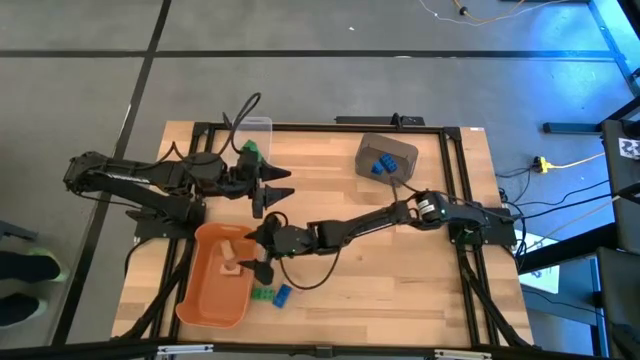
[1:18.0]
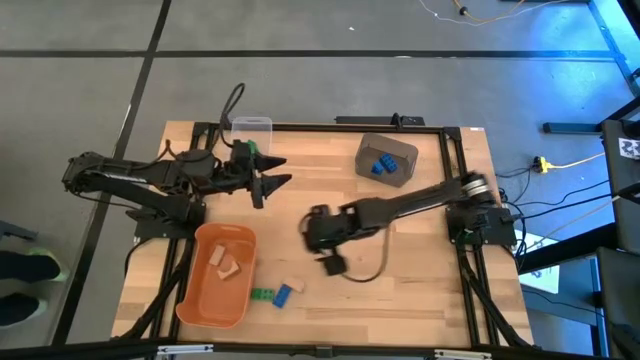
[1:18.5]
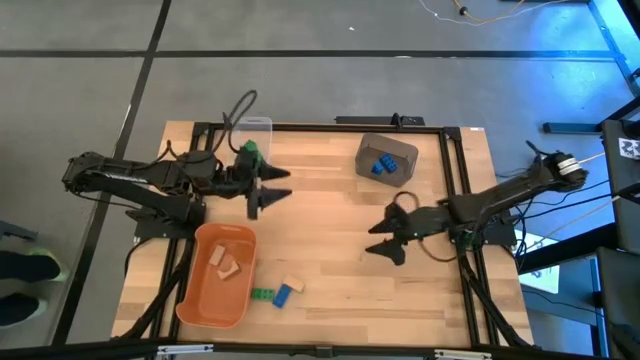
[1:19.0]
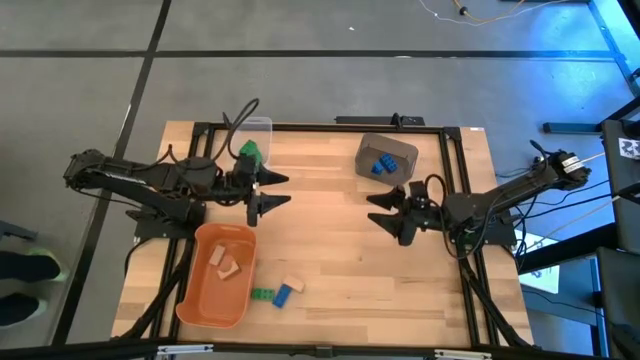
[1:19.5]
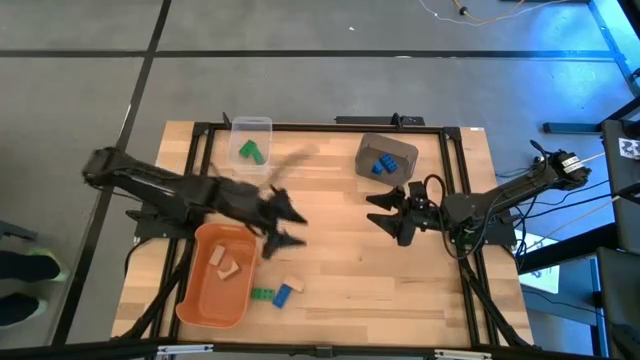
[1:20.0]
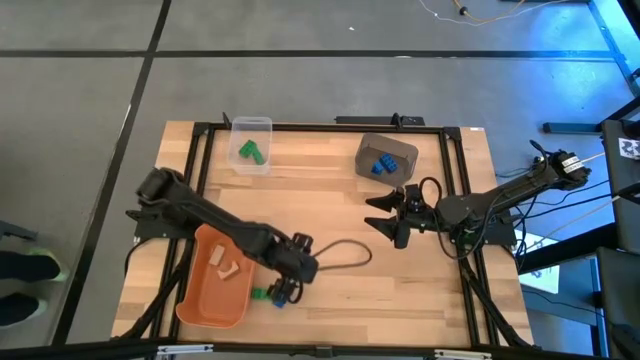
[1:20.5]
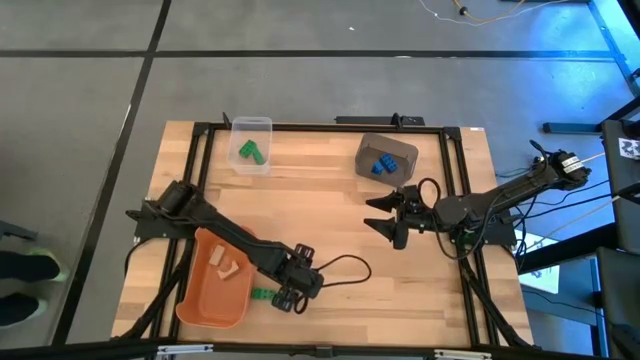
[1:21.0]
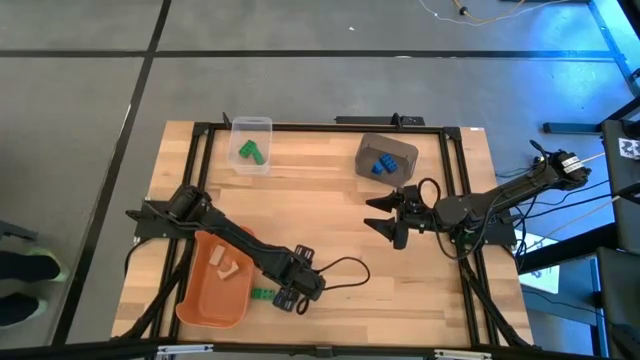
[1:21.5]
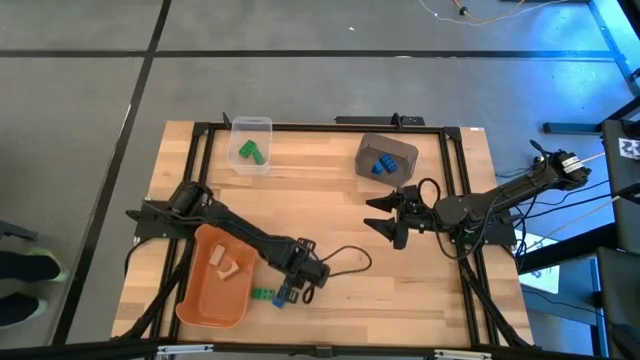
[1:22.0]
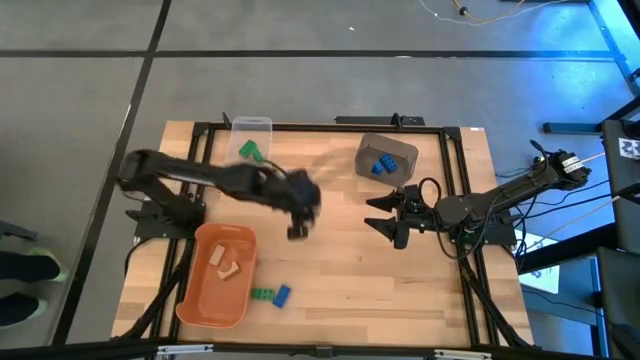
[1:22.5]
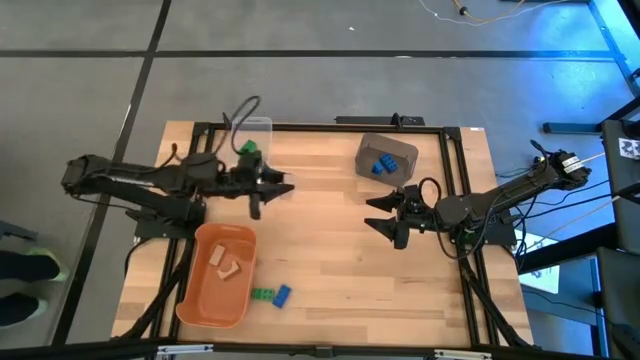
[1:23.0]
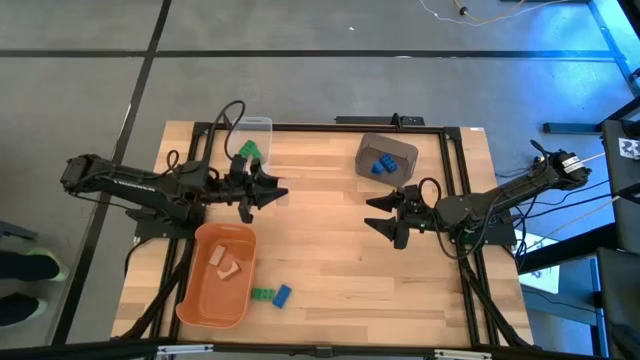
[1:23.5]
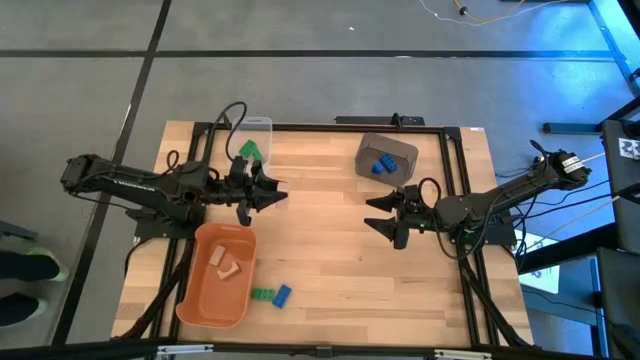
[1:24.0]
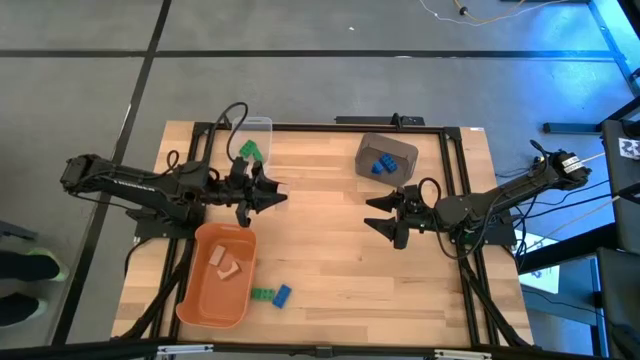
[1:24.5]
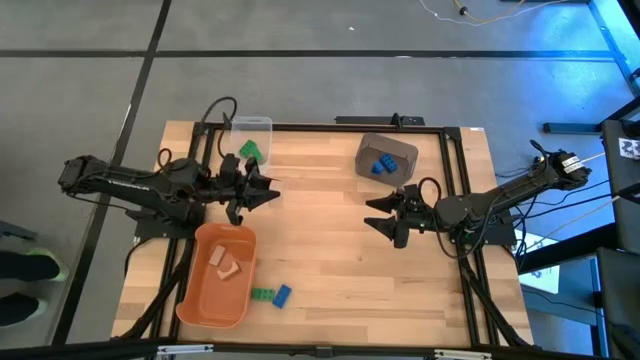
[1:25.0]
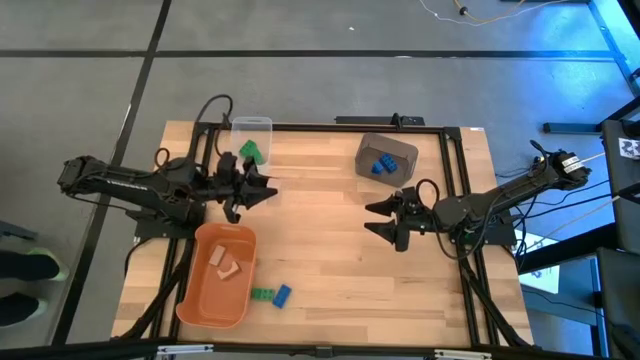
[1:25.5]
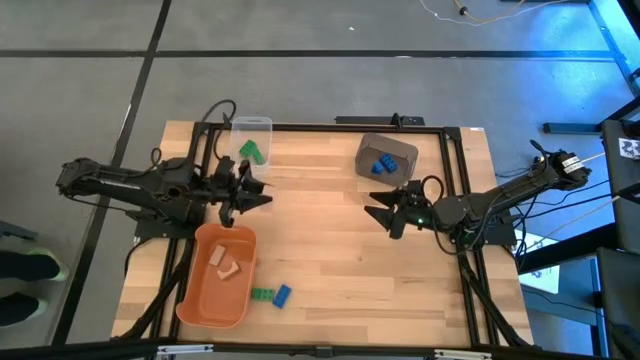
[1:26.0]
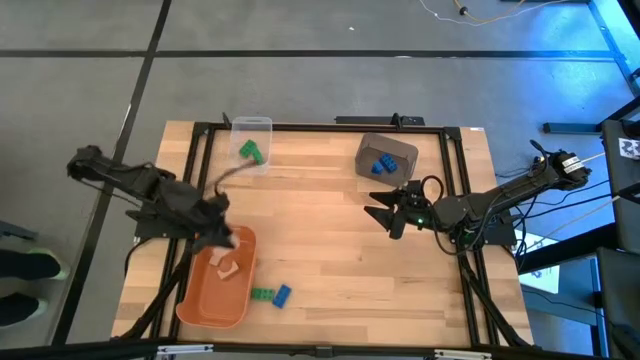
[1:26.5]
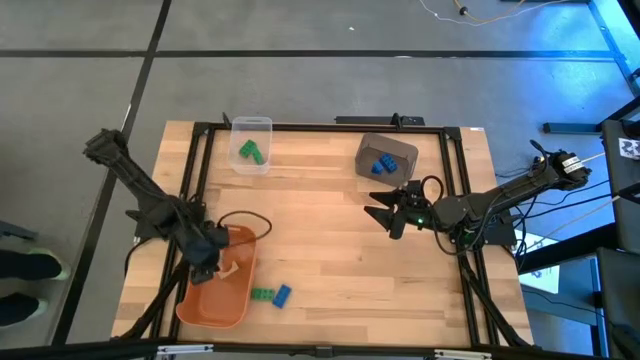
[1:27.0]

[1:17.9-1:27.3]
Task: Sort & place blocks by color
Put the brown block into the orange bin

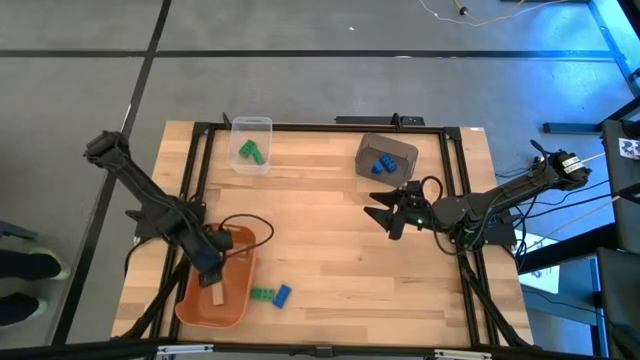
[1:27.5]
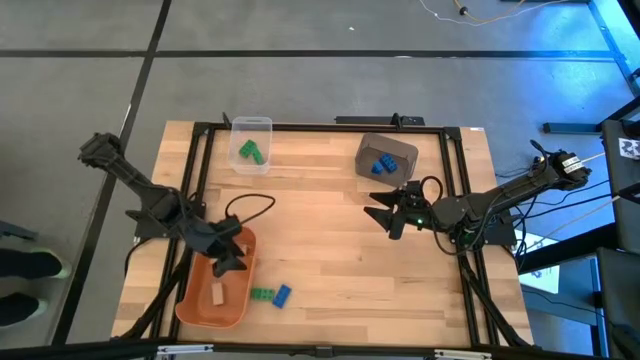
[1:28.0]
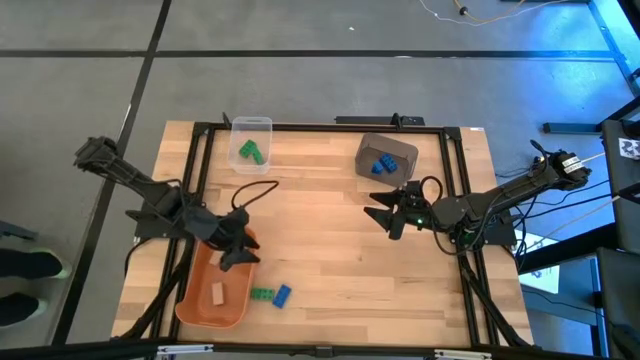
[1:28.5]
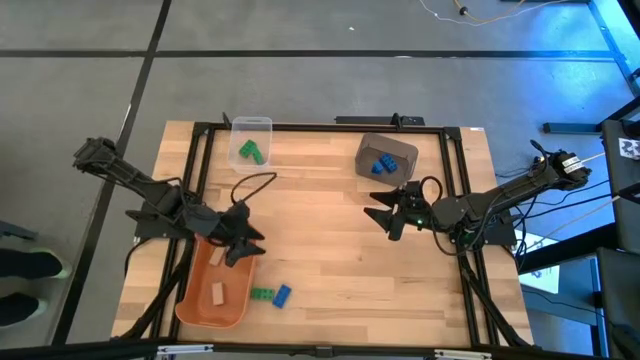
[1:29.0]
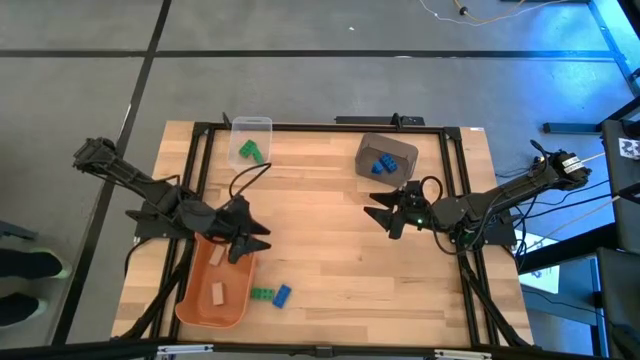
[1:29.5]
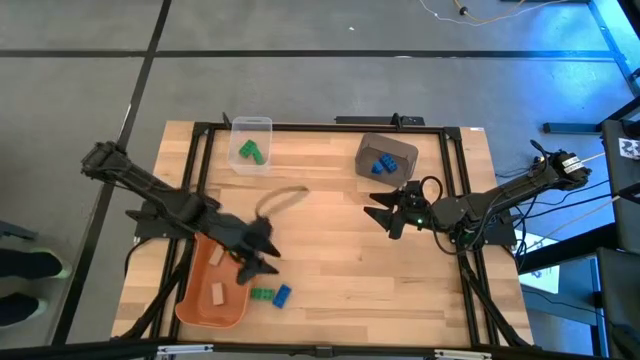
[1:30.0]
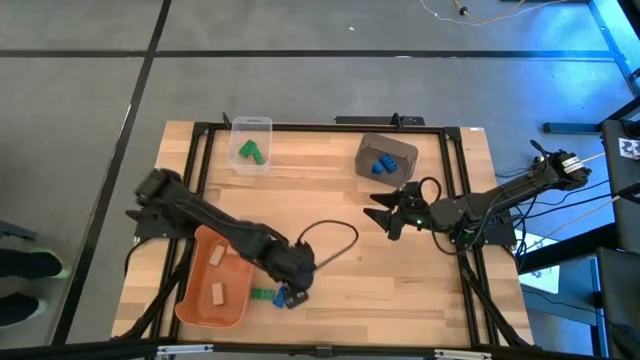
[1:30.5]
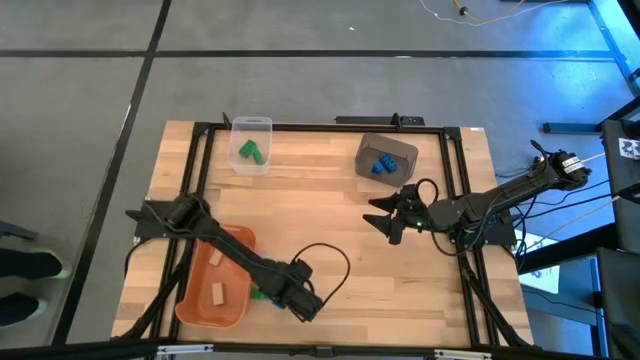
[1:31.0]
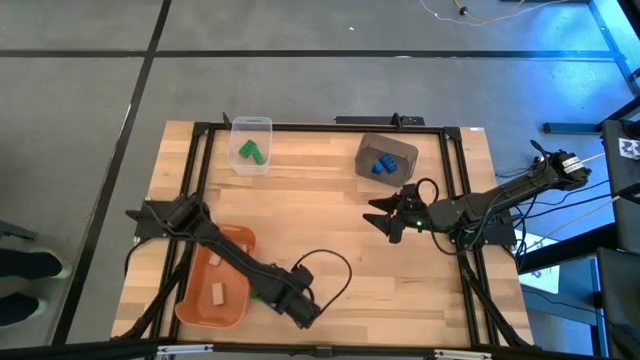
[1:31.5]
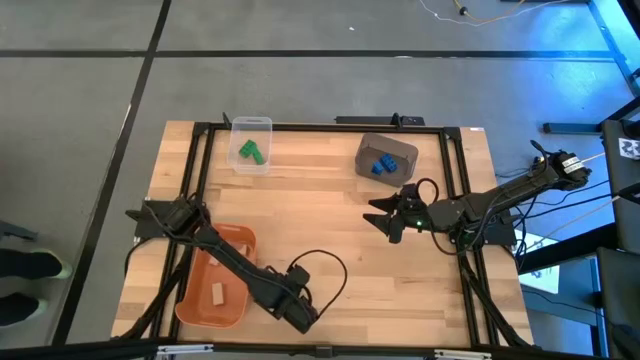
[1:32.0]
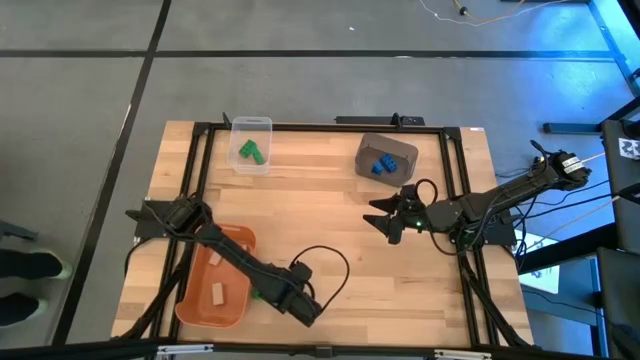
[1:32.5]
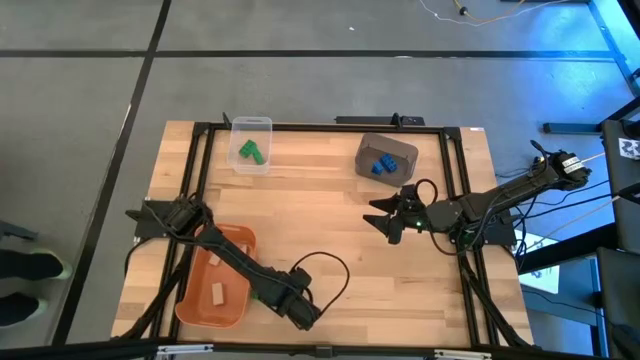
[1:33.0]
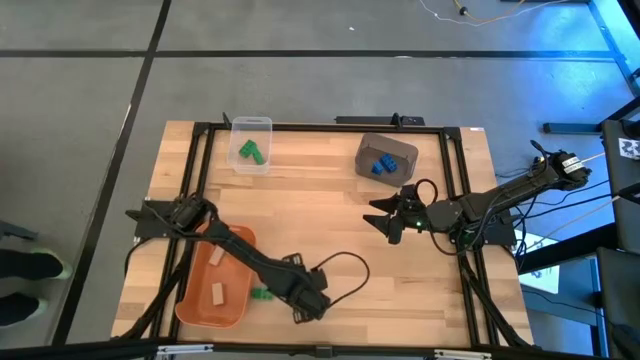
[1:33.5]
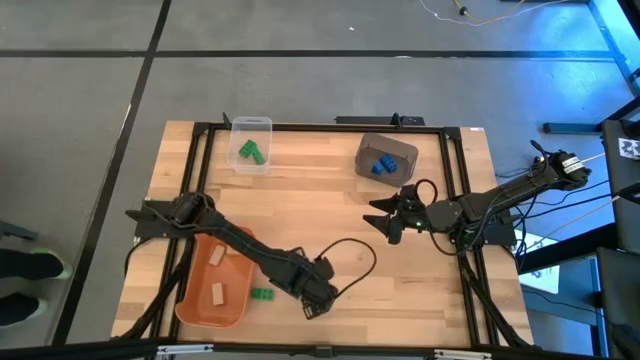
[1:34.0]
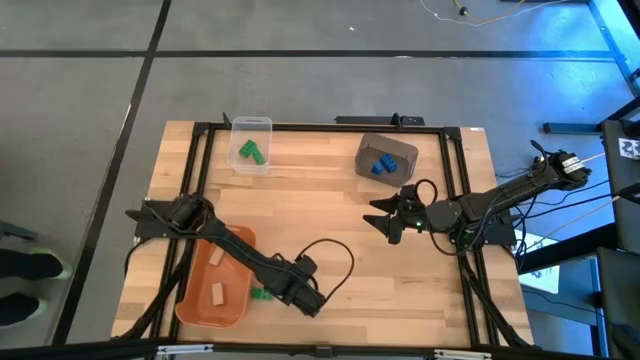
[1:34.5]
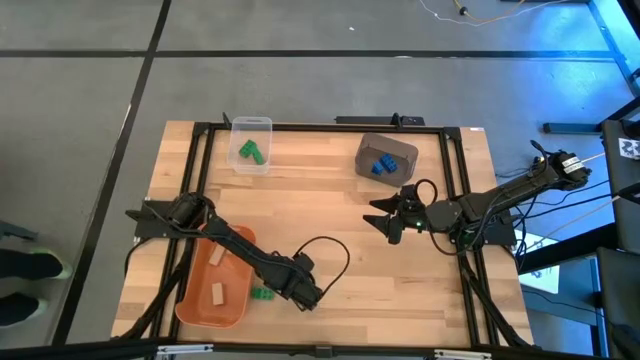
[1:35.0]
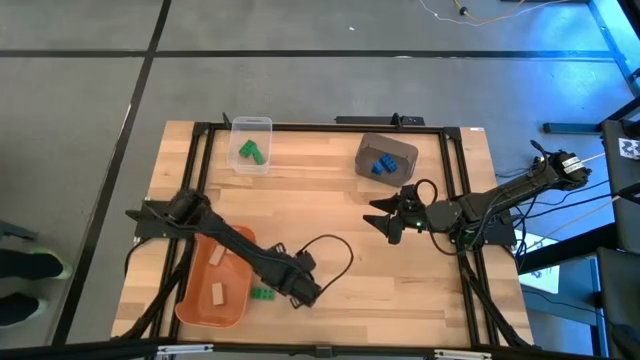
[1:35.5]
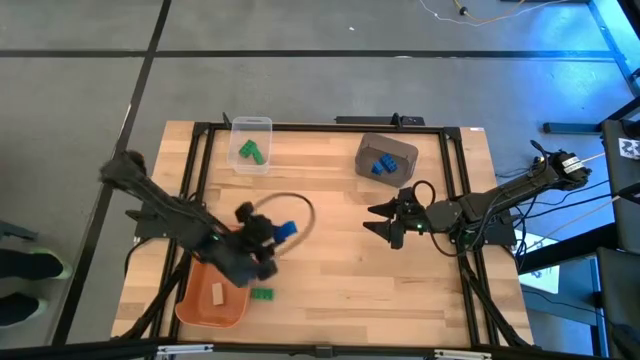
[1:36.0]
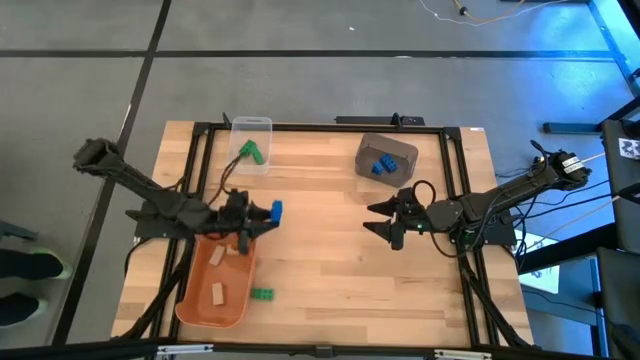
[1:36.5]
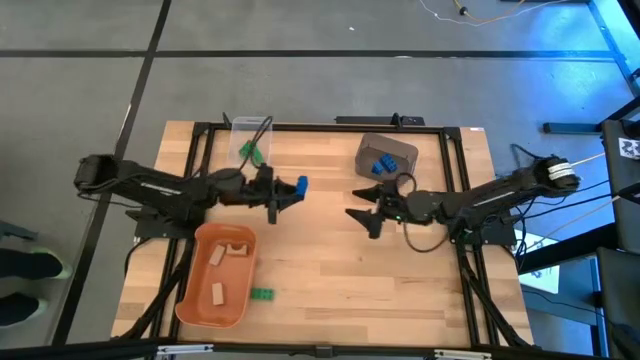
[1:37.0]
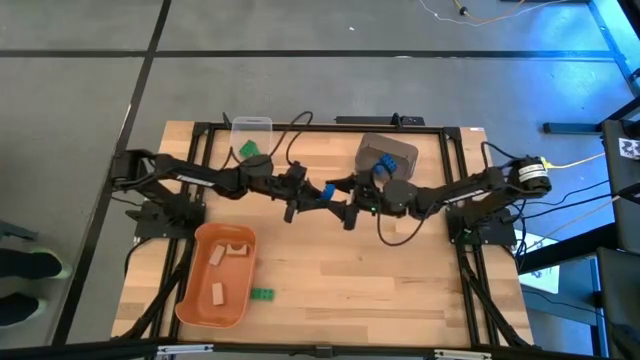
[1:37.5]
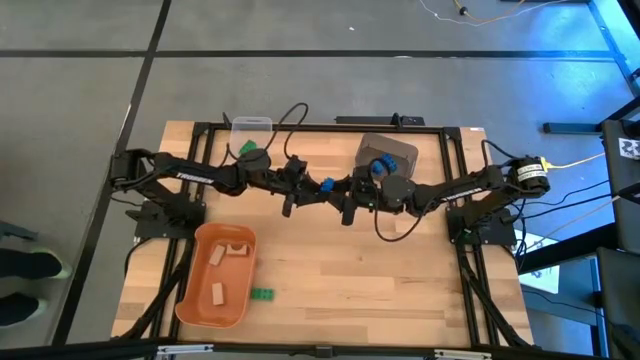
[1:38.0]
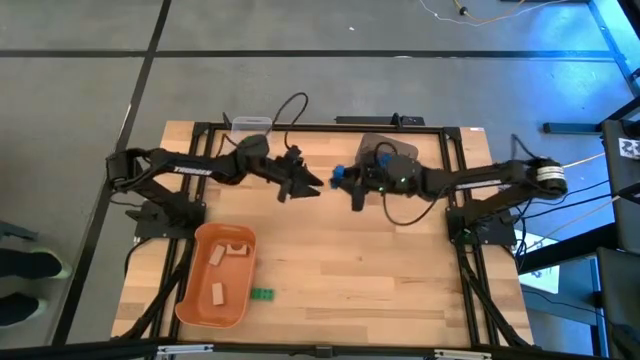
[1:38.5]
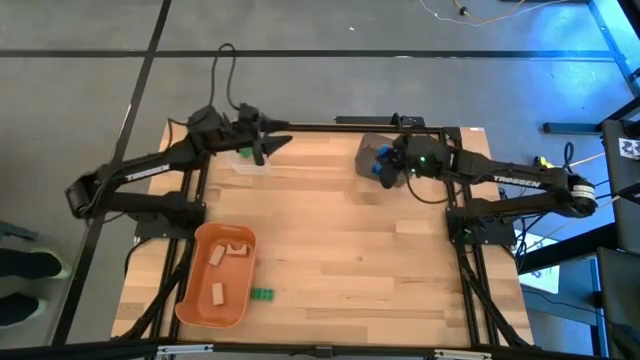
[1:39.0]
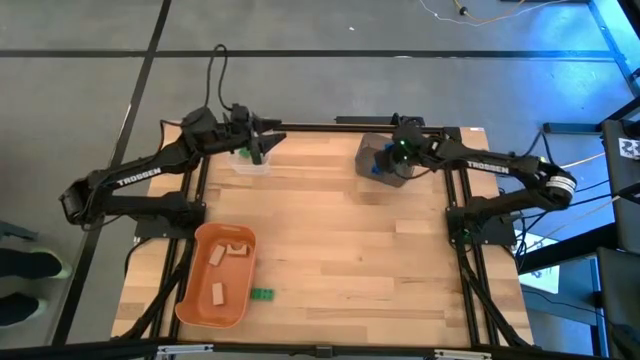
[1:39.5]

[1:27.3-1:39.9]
Put the blue game piece into the black bin

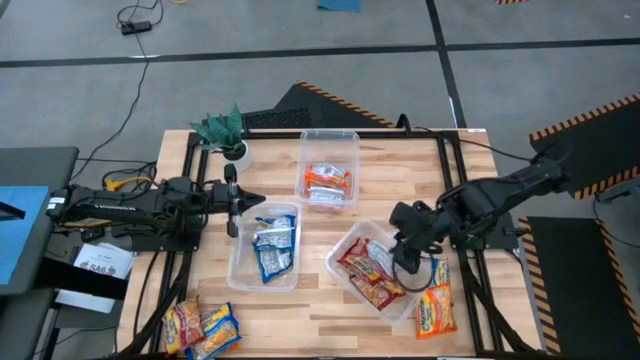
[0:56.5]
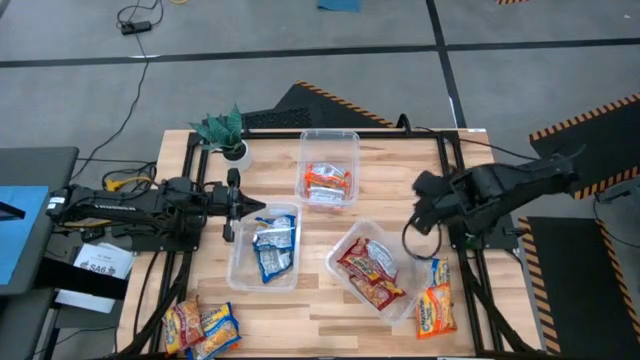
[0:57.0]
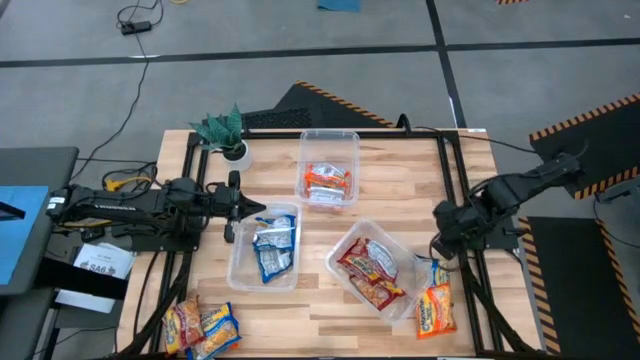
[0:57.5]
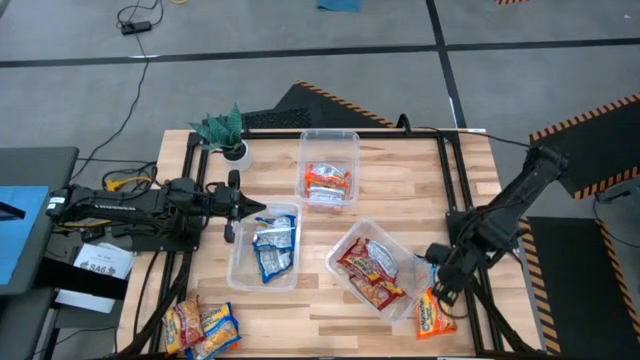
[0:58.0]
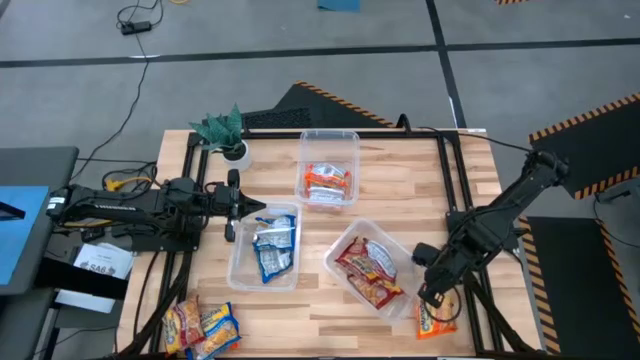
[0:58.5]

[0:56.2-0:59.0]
Task: Sort Maruchan noodles
Adjust the bottom right transparent bin
